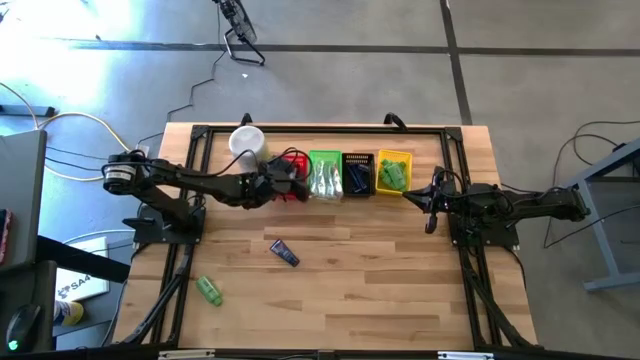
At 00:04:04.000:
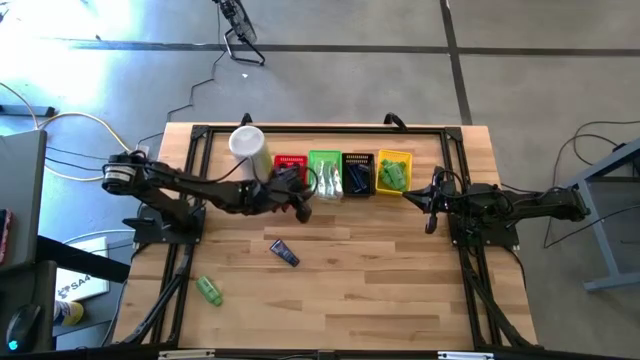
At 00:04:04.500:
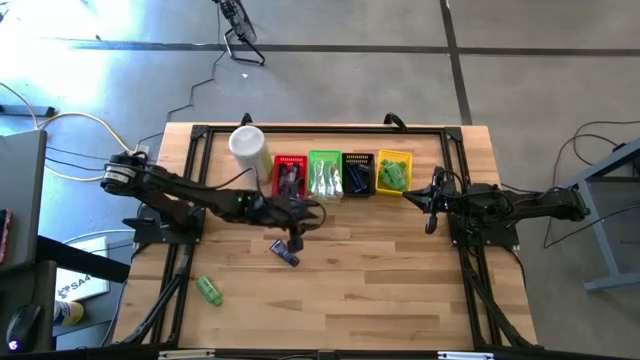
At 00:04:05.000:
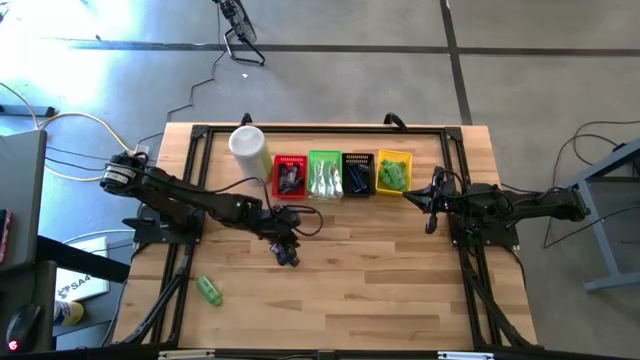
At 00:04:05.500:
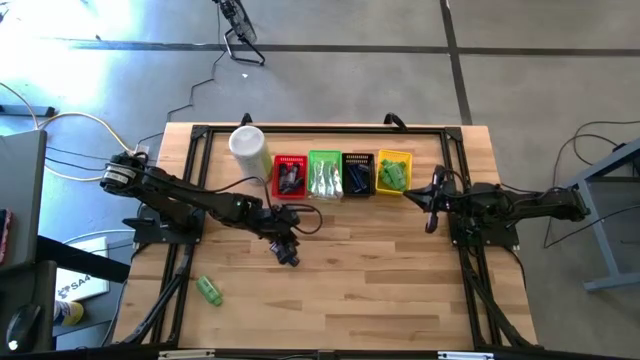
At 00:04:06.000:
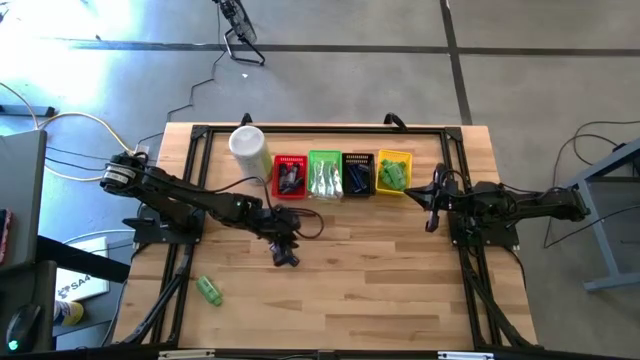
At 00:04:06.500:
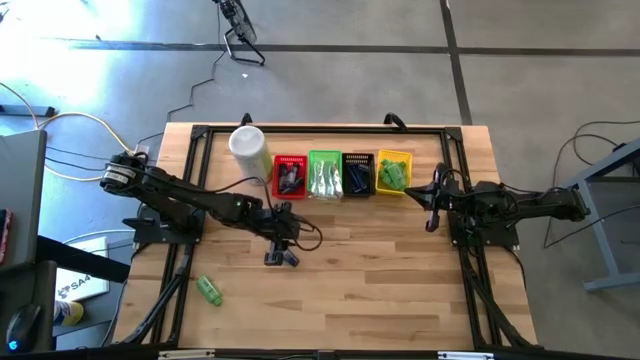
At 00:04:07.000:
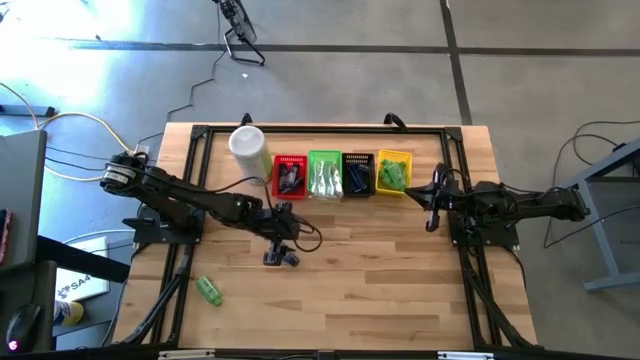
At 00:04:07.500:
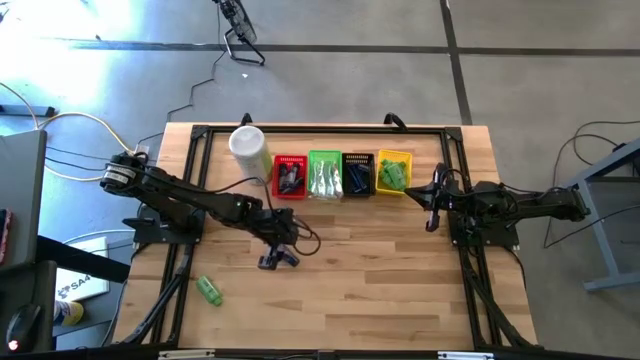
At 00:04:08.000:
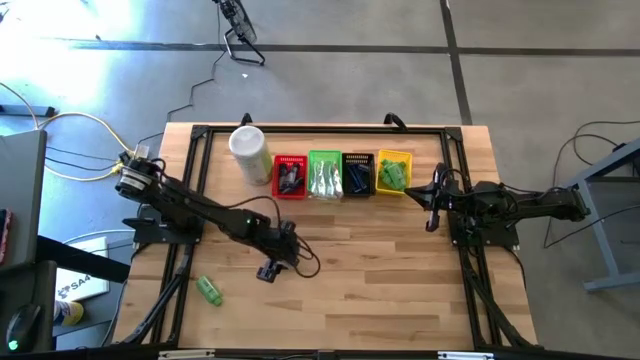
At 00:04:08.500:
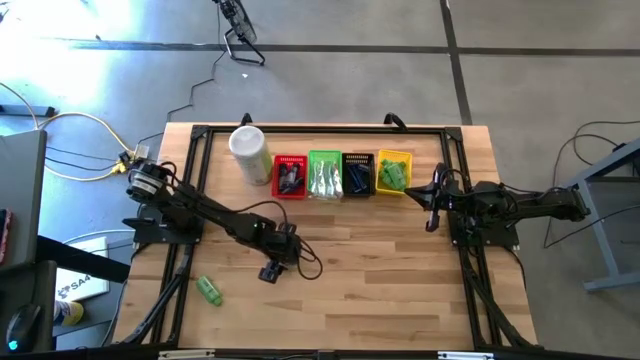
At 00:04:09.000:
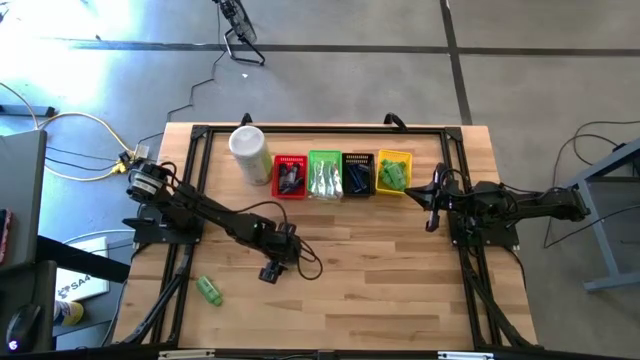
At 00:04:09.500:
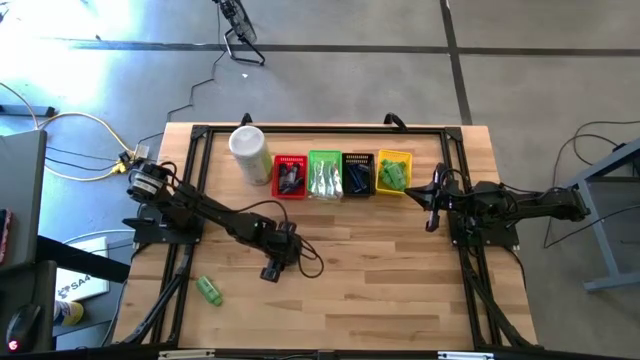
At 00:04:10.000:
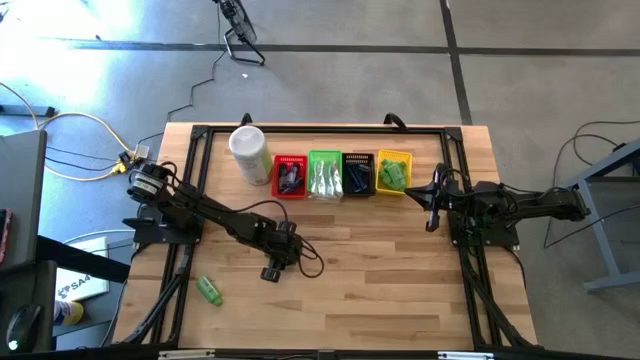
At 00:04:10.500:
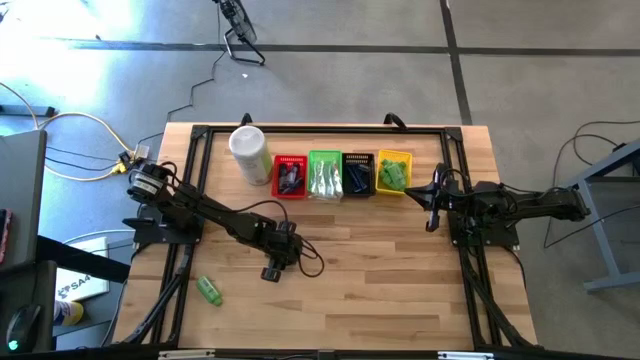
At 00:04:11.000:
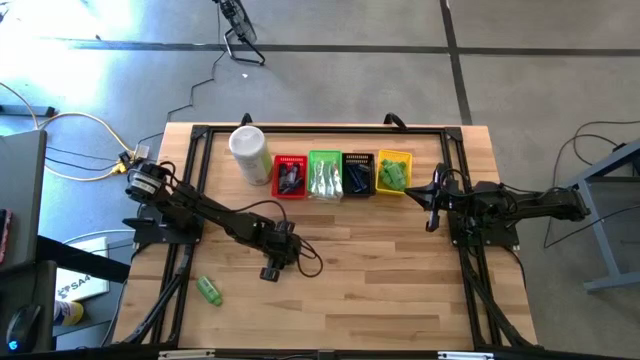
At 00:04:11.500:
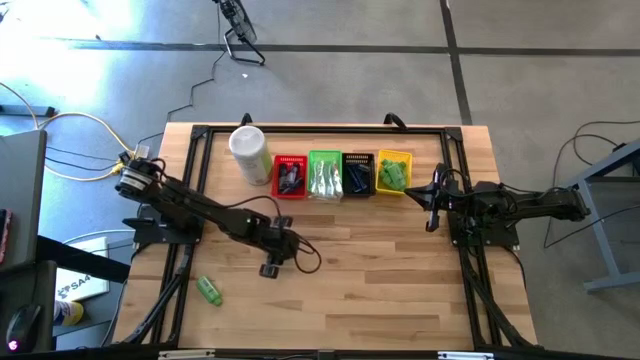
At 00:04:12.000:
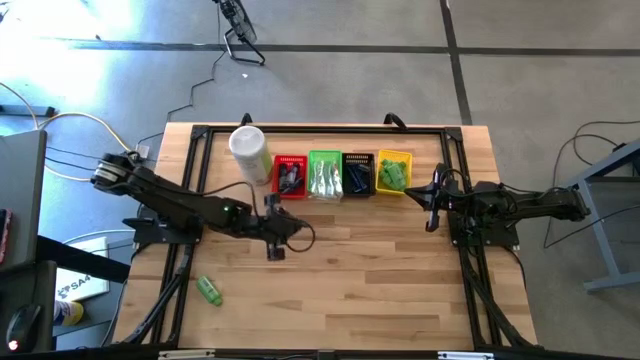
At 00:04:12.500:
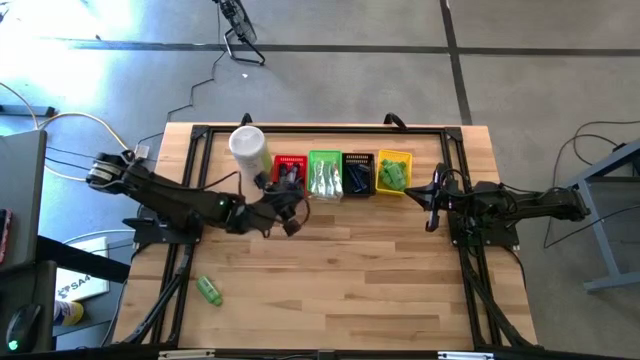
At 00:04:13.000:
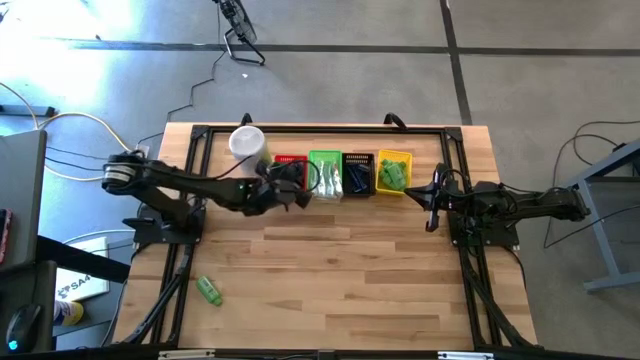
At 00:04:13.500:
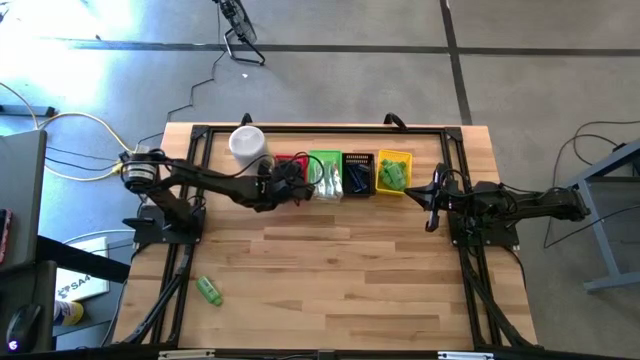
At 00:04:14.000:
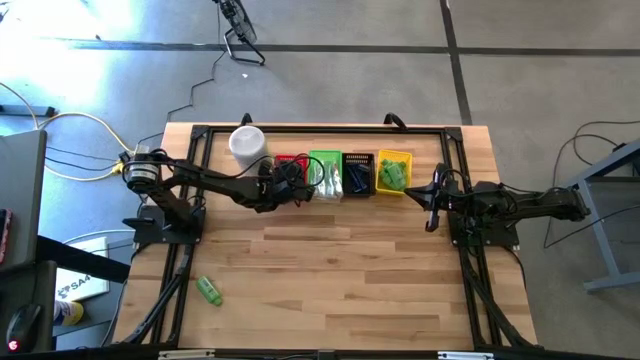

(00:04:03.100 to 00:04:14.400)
Task: Pick & Place Travel size toiletries
Put the blue shave cream into the red bin

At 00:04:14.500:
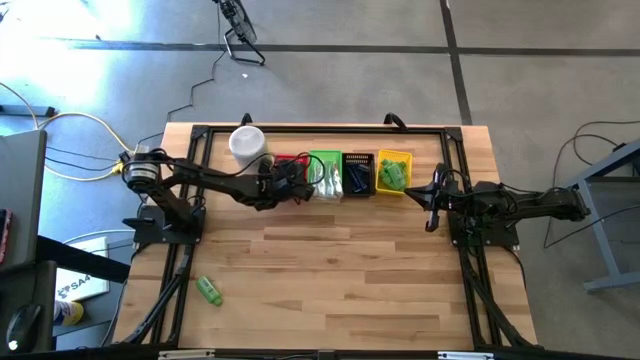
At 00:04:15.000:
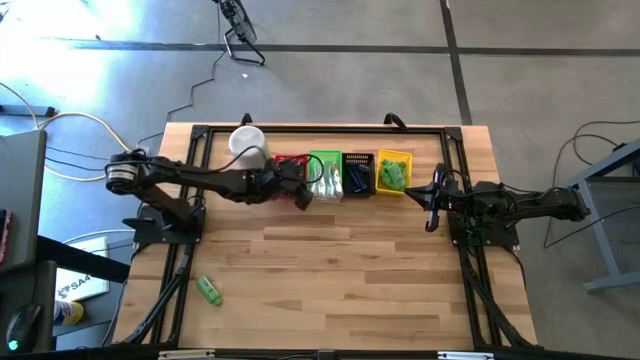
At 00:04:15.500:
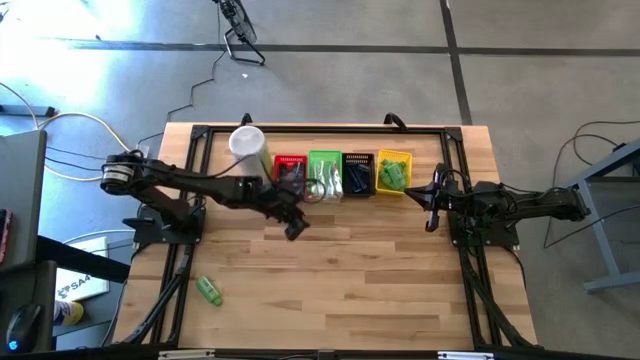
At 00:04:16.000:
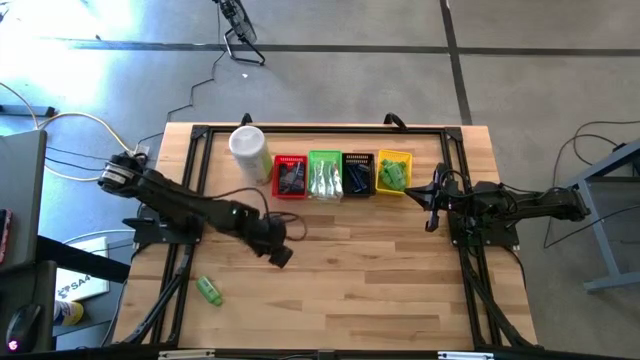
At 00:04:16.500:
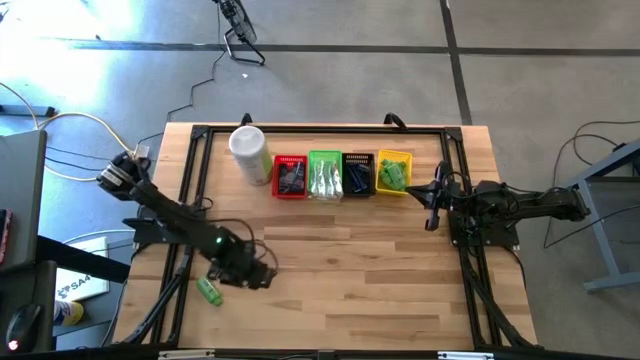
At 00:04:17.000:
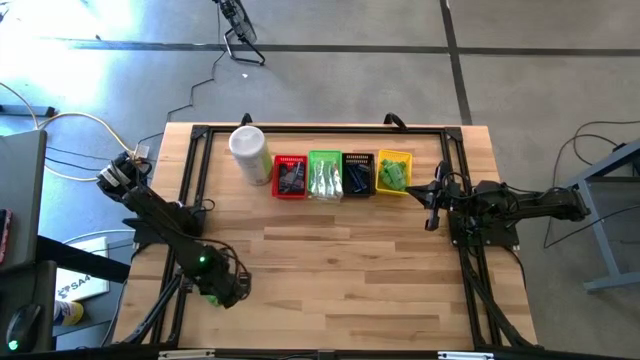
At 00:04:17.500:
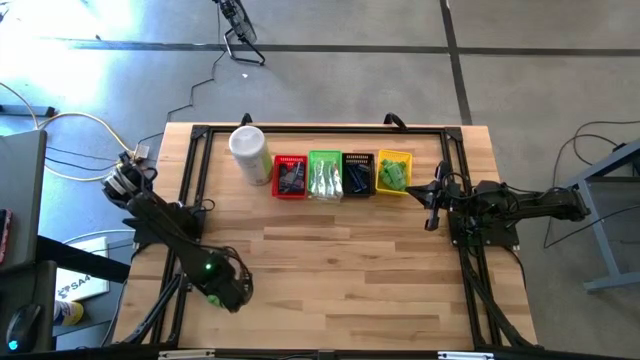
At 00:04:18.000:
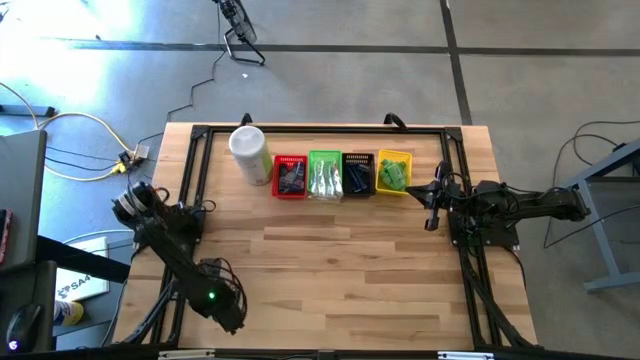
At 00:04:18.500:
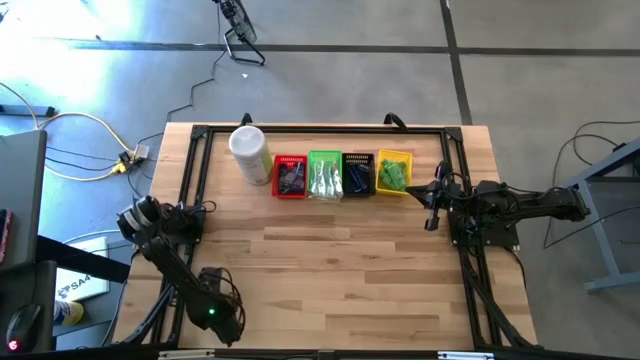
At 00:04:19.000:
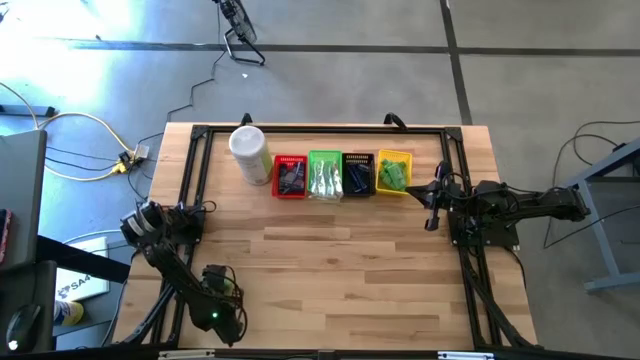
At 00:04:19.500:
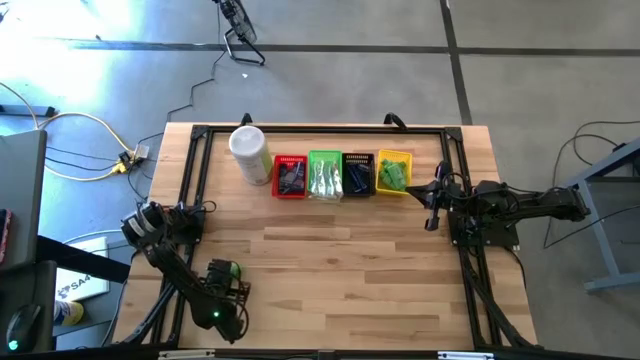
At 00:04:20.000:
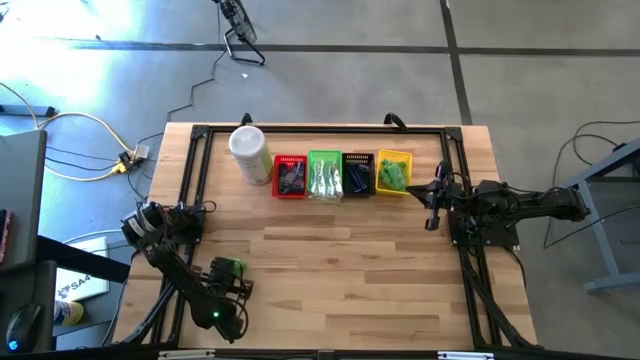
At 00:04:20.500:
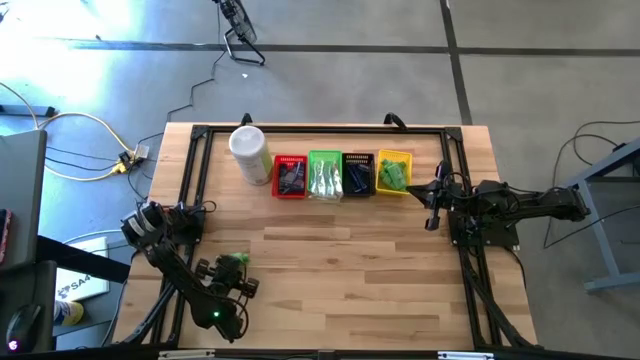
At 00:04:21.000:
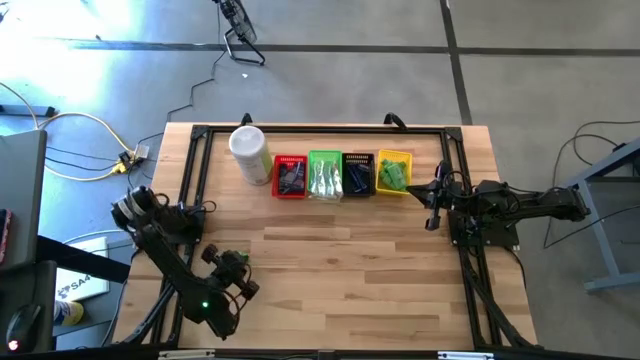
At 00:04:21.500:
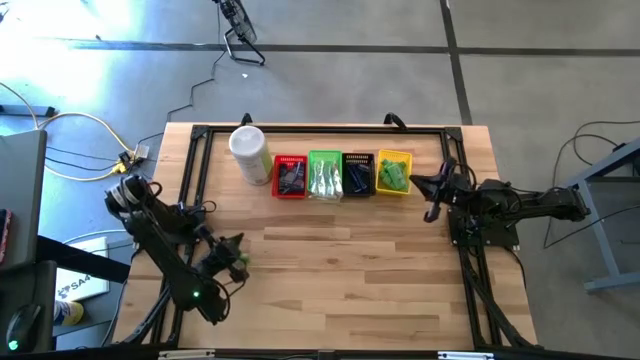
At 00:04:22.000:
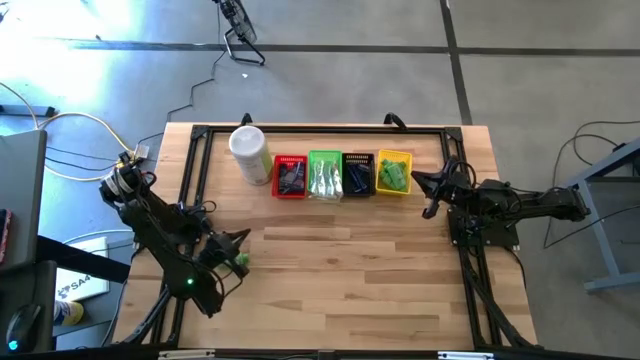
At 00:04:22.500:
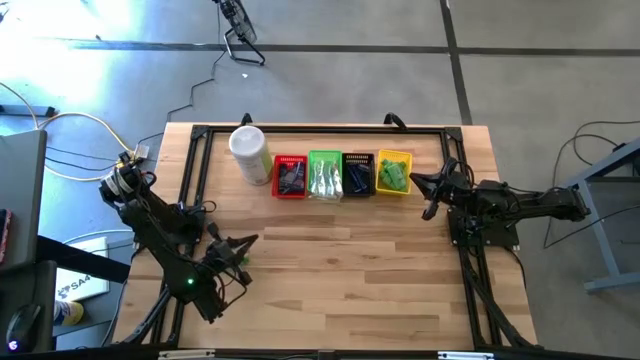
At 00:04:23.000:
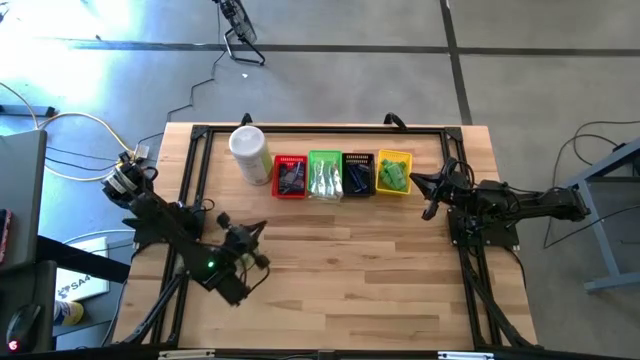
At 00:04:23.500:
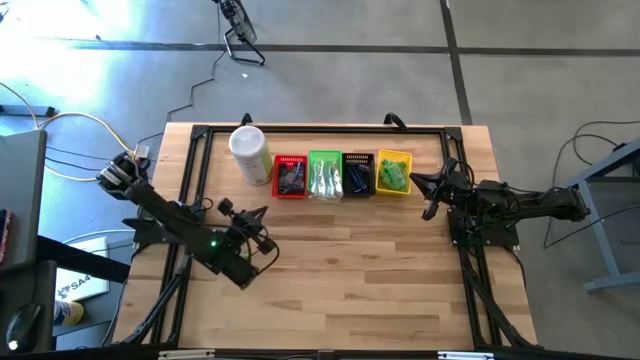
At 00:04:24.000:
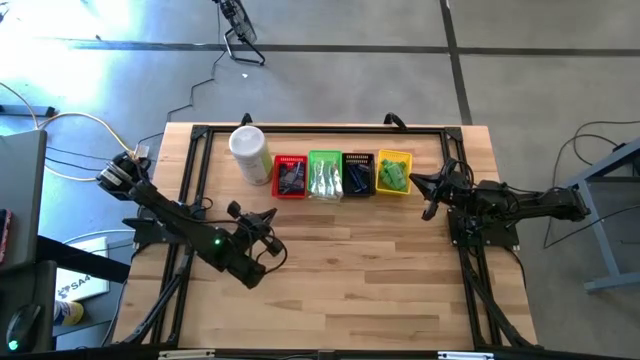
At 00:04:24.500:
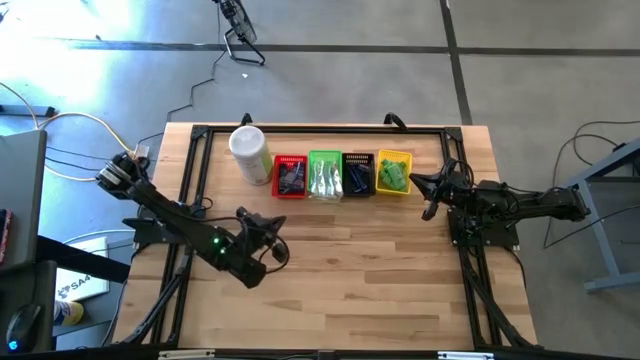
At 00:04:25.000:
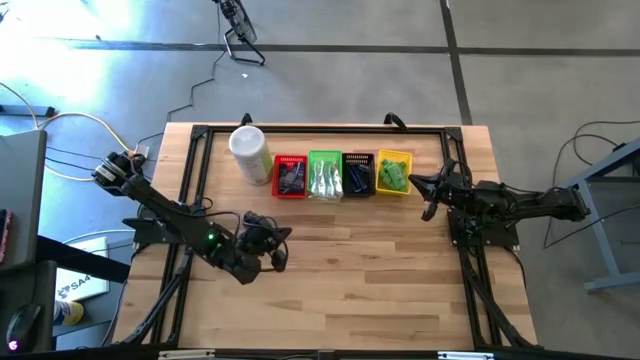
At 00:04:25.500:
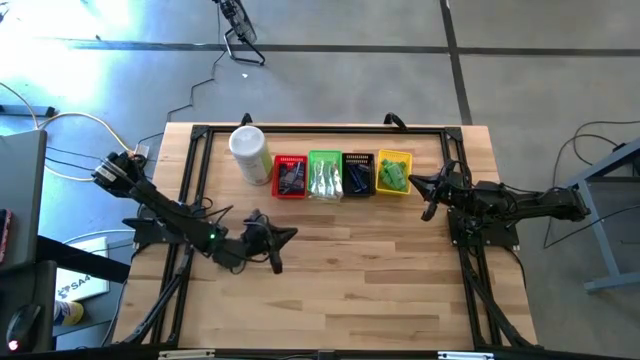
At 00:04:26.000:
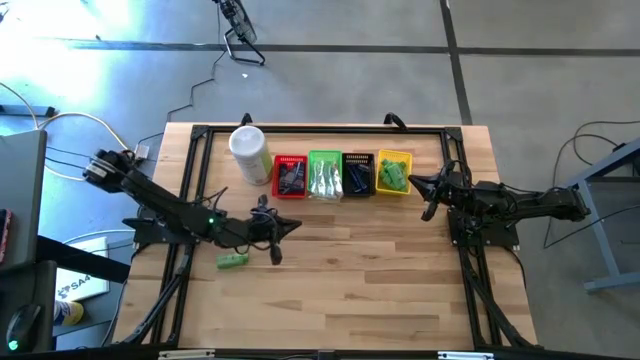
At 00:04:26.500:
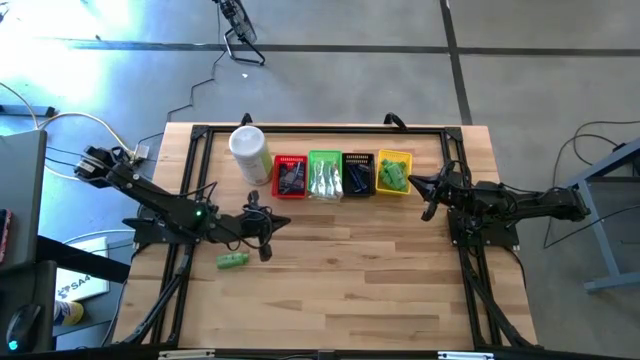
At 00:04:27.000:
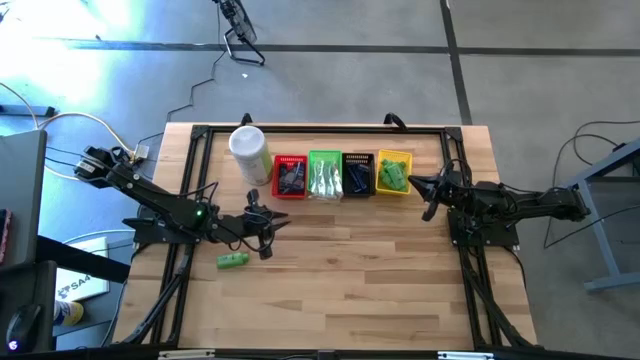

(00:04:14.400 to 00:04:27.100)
Put the green shampoo into the yellow bin
